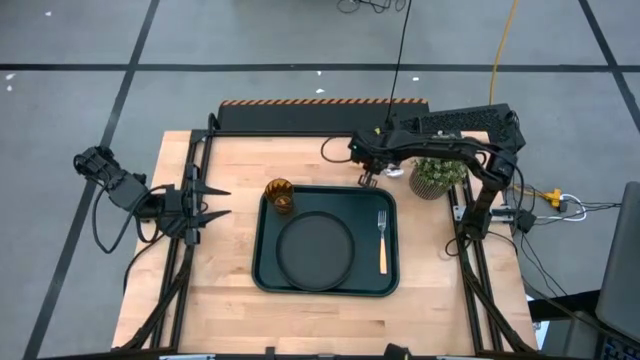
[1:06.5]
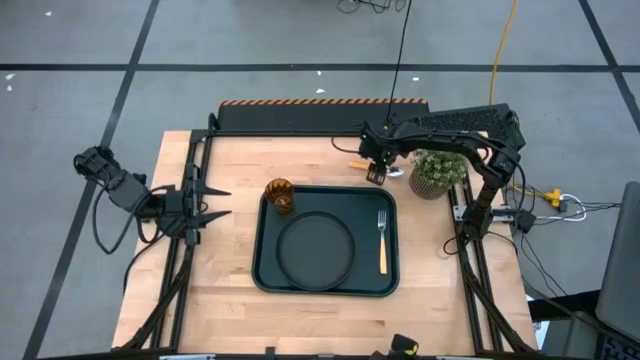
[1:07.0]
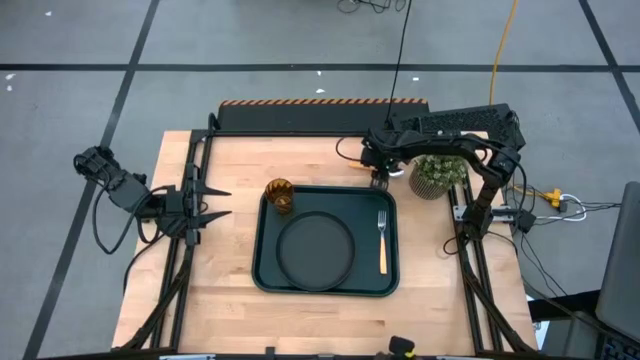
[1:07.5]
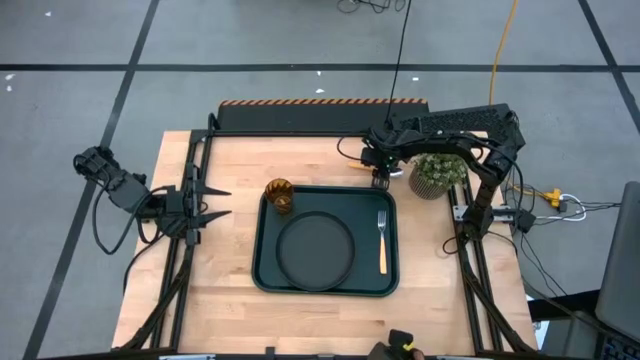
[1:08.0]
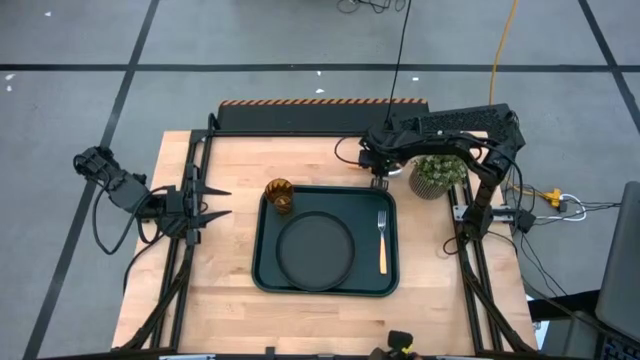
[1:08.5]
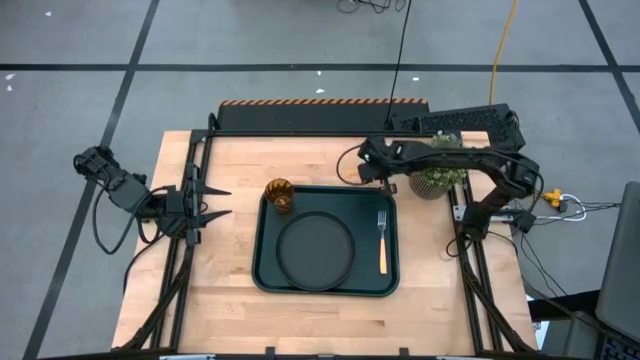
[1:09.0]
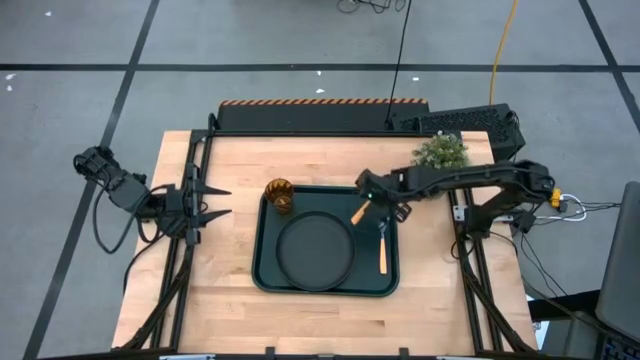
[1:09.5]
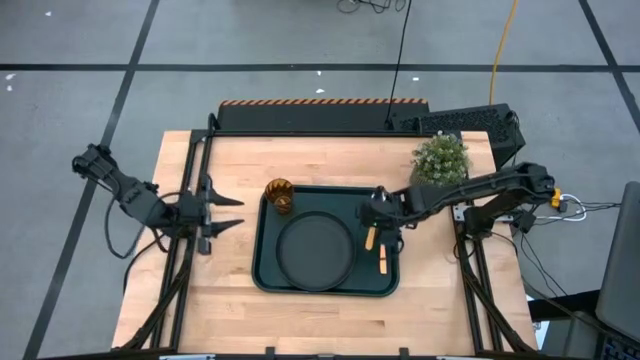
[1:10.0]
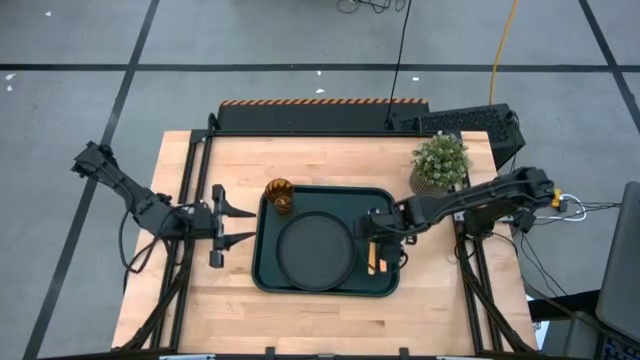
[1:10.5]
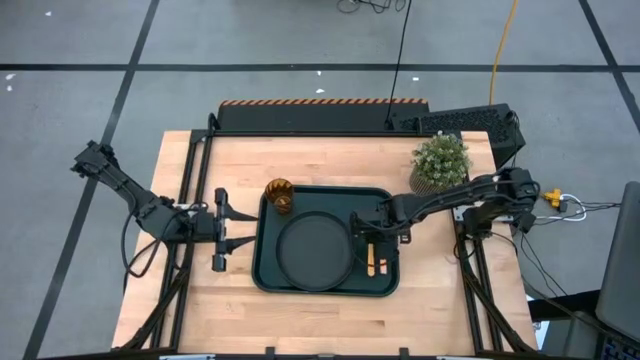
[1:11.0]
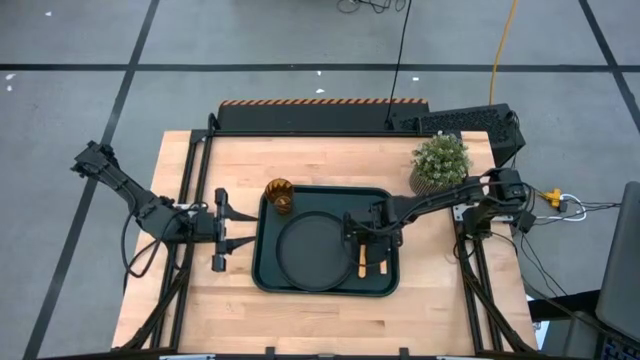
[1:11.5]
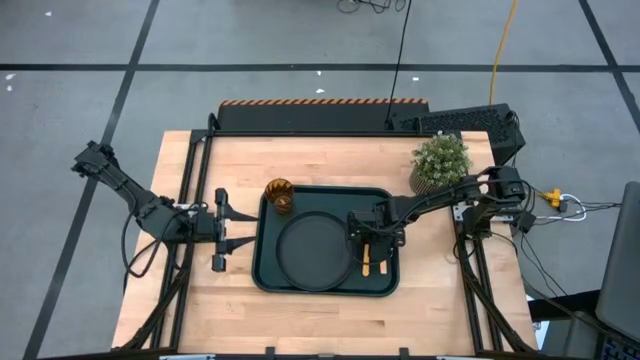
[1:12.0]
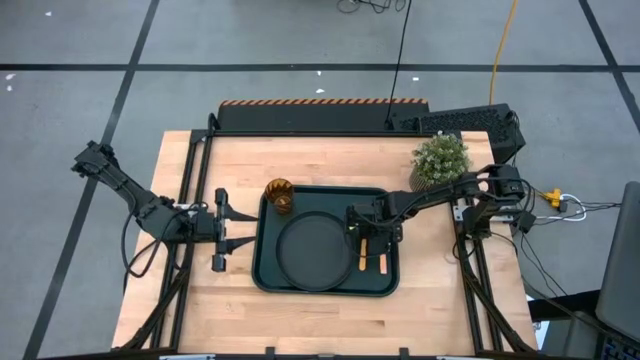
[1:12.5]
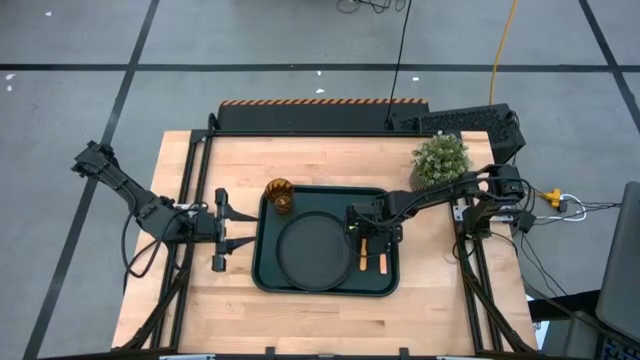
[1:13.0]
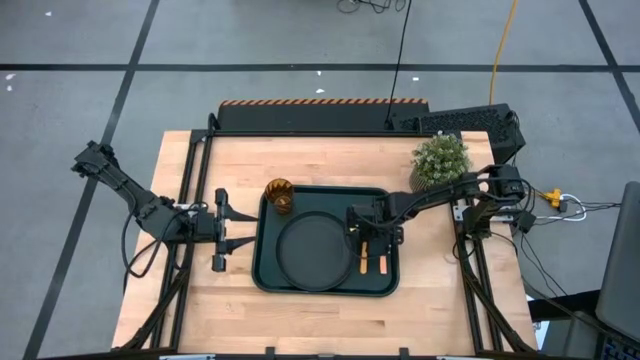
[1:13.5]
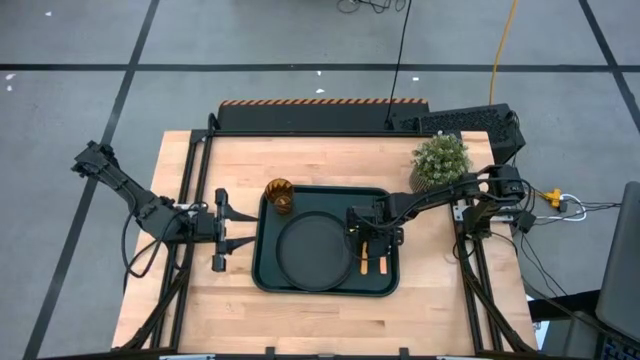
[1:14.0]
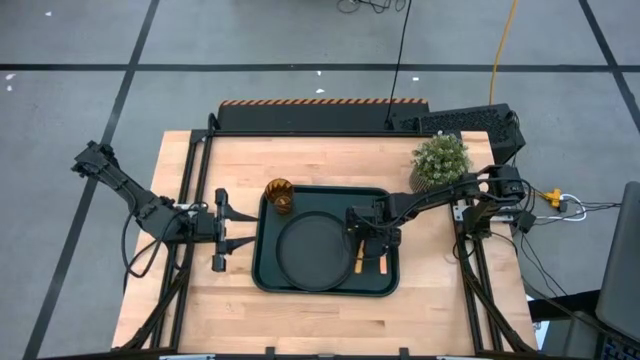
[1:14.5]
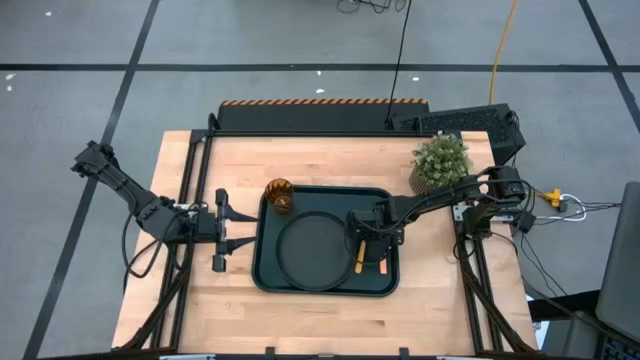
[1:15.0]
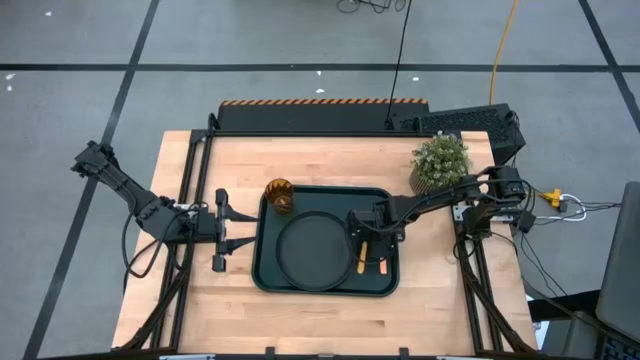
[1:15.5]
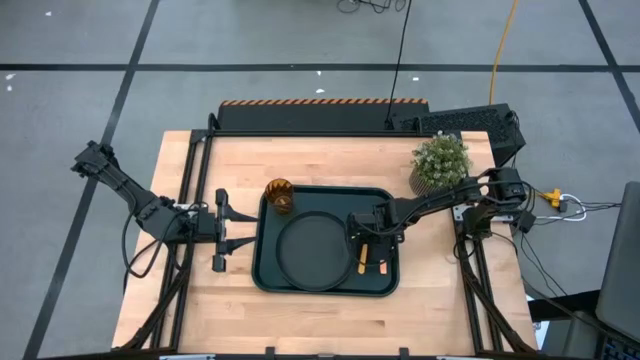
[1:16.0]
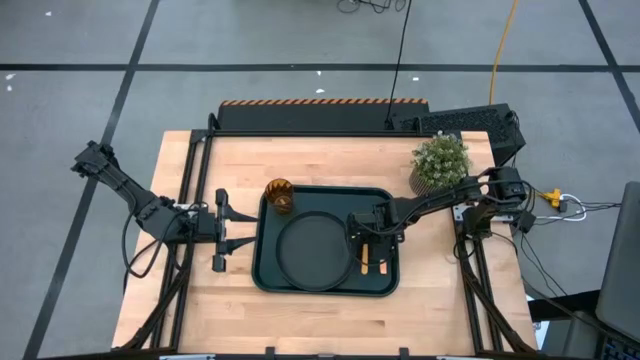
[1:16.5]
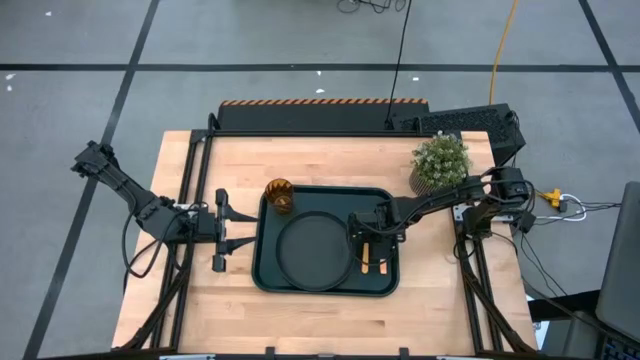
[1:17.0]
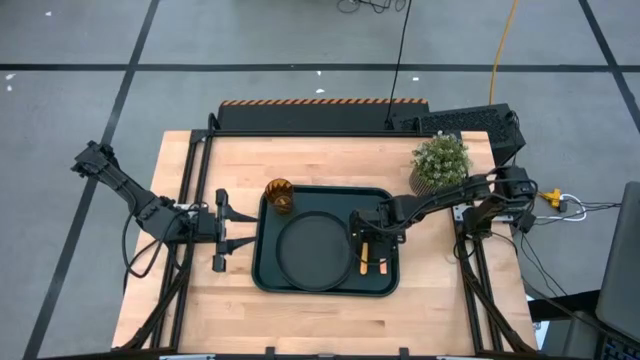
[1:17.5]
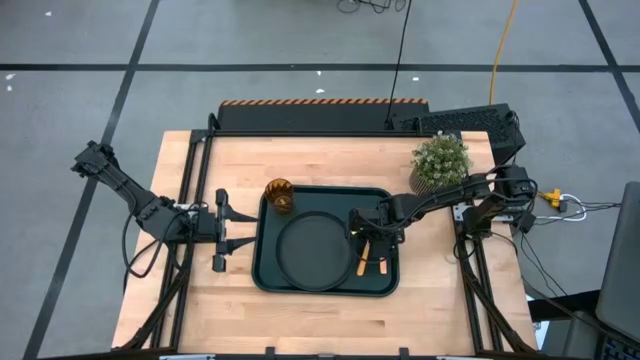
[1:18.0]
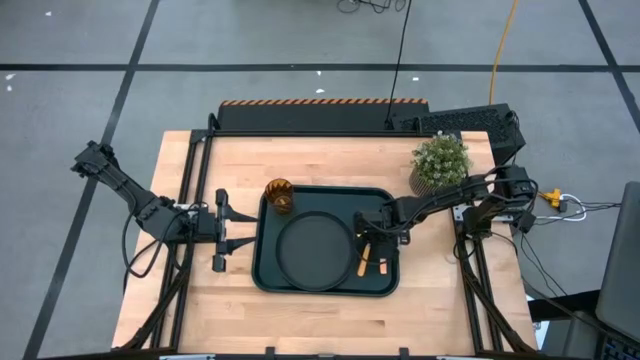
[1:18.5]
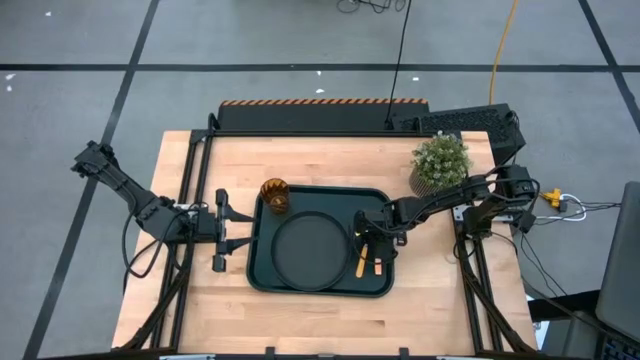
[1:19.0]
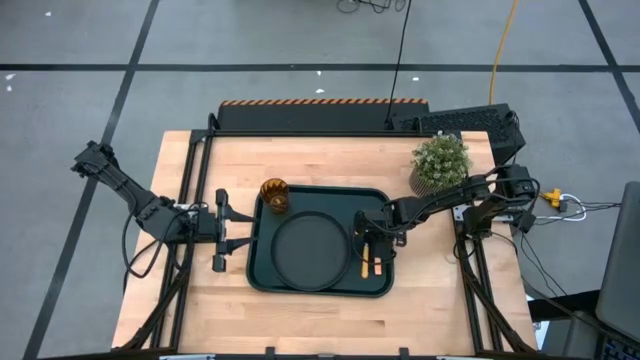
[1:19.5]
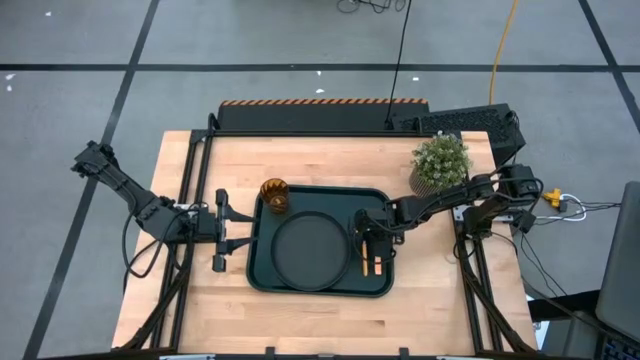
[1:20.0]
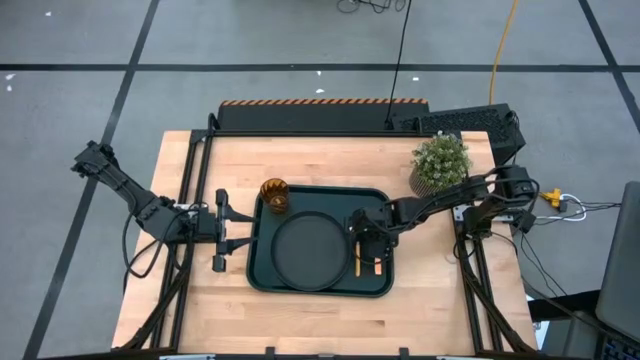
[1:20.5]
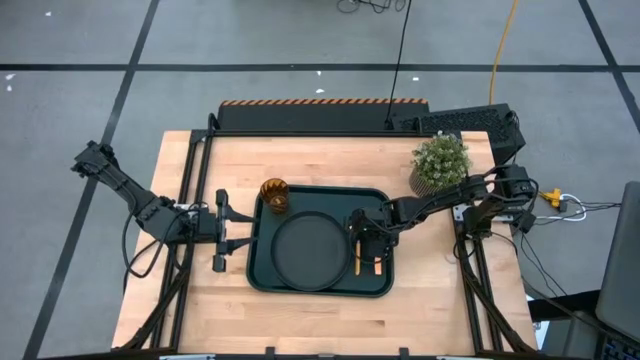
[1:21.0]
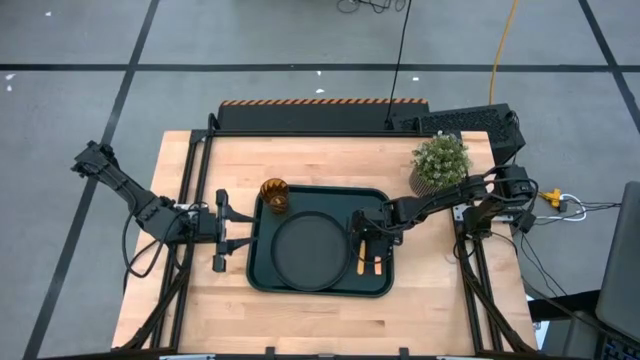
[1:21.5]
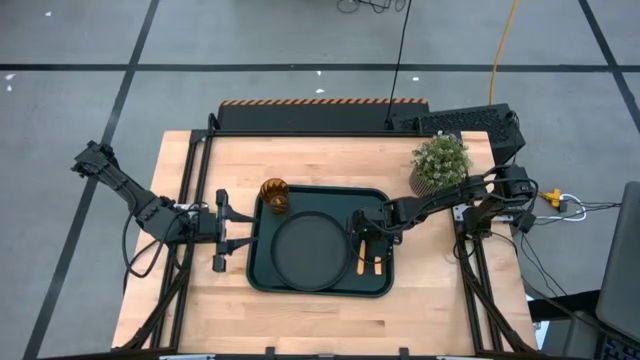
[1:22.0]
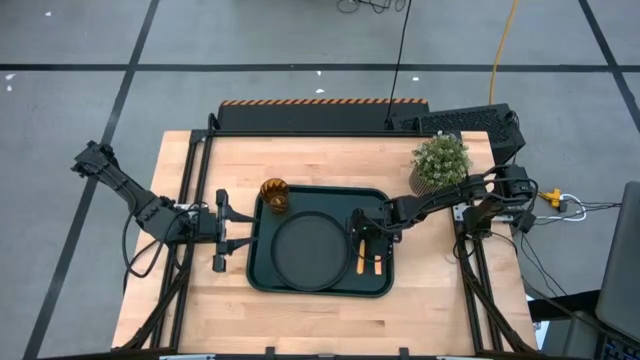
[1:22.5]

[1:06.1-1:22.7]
Task: Pick and place plate/cup/fork/spoon on tray
Put the orange spoon on the black tray

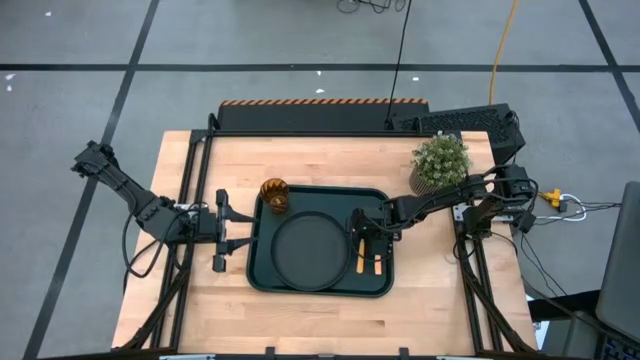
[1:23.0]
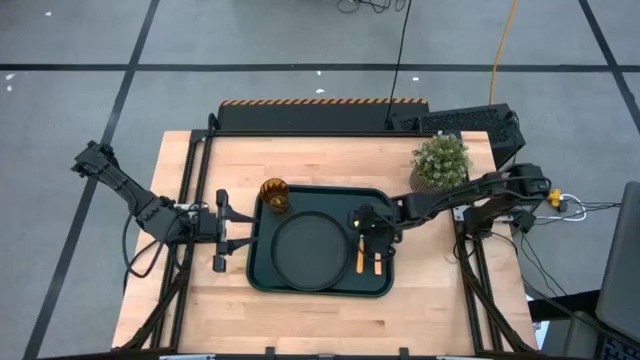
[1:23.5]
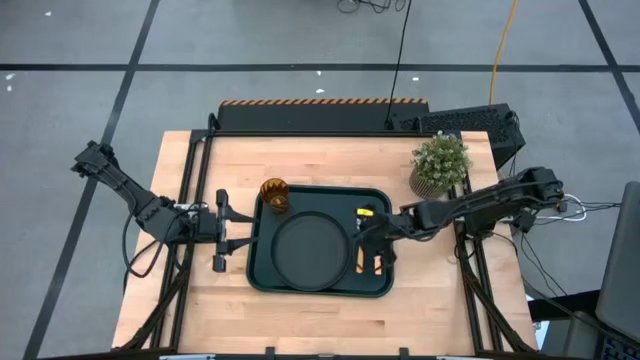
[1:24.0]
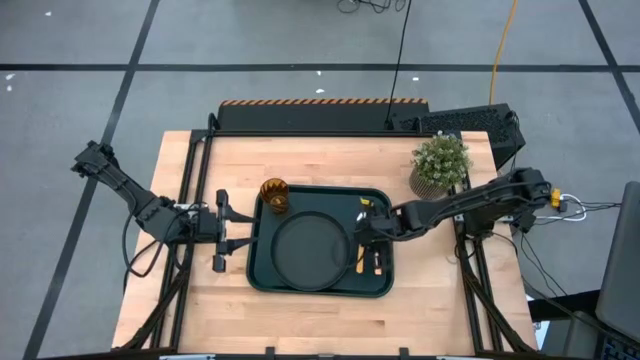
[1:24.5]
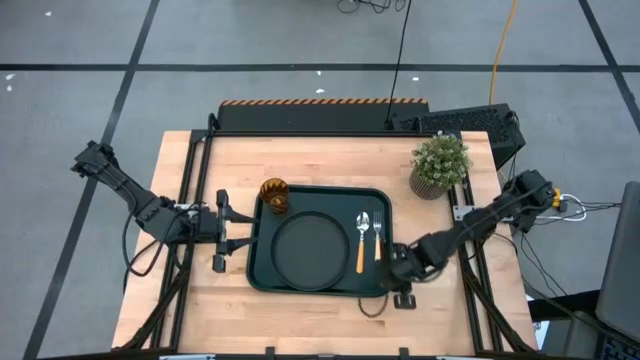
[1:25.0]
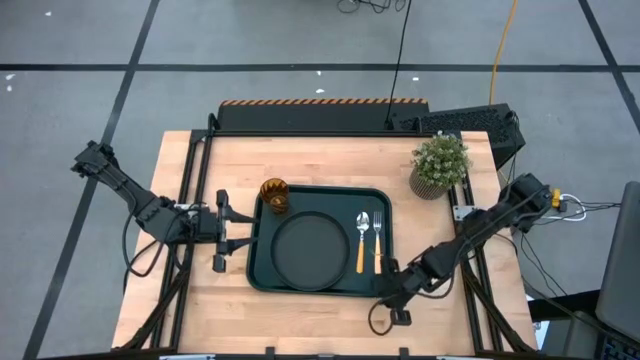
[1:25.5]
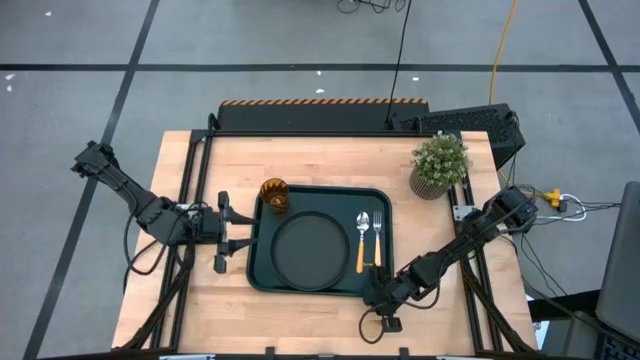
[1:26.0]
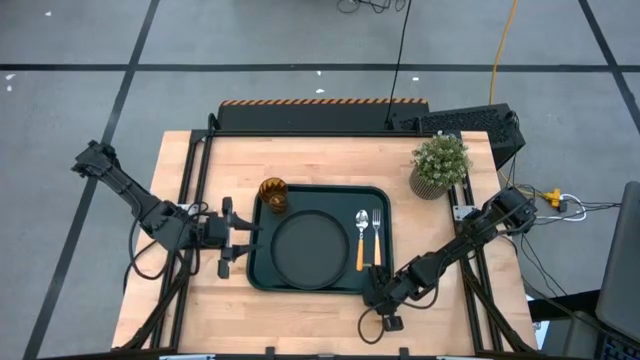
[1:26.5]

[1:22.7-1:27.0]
Adjust the black tray
